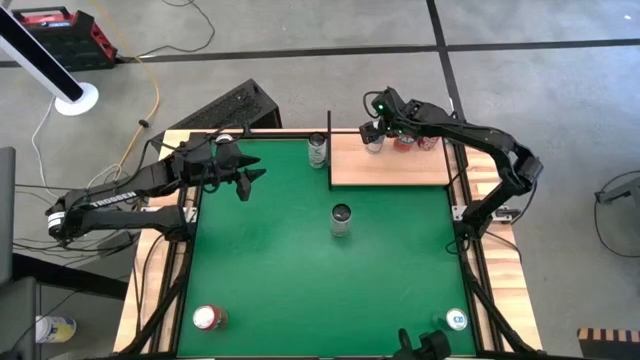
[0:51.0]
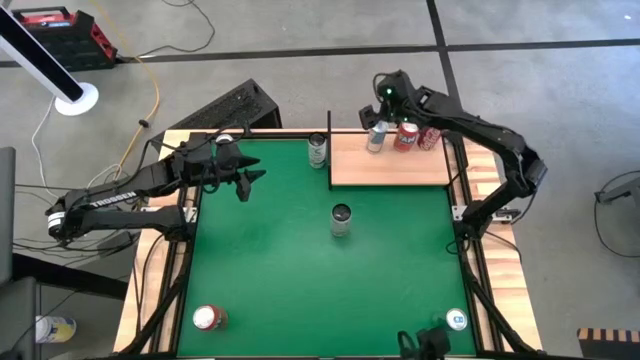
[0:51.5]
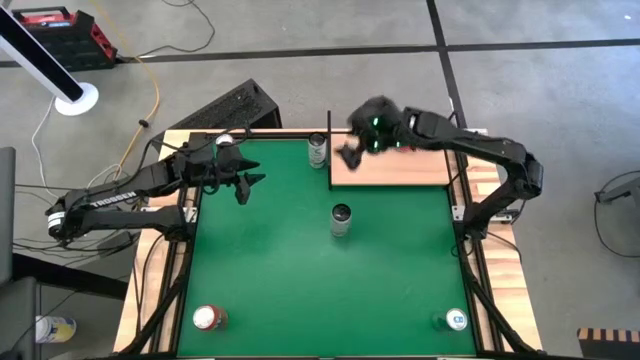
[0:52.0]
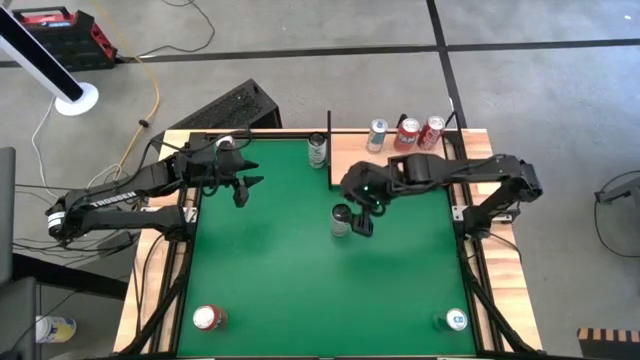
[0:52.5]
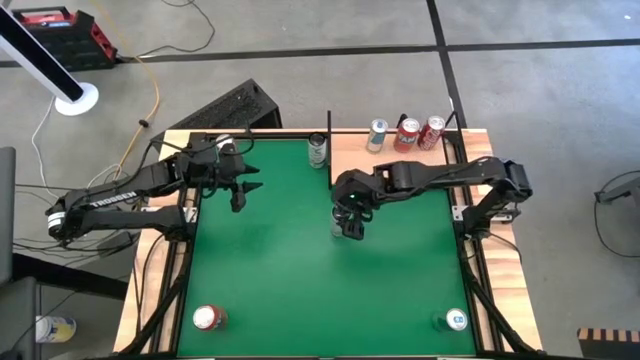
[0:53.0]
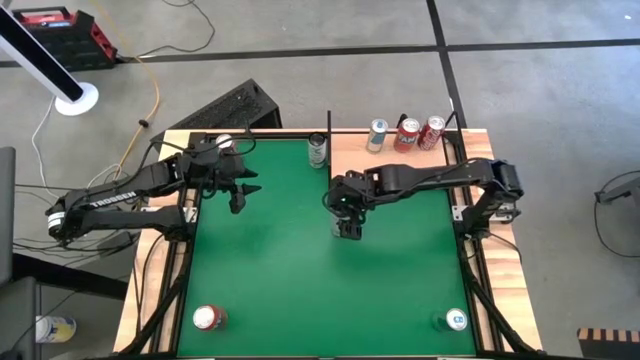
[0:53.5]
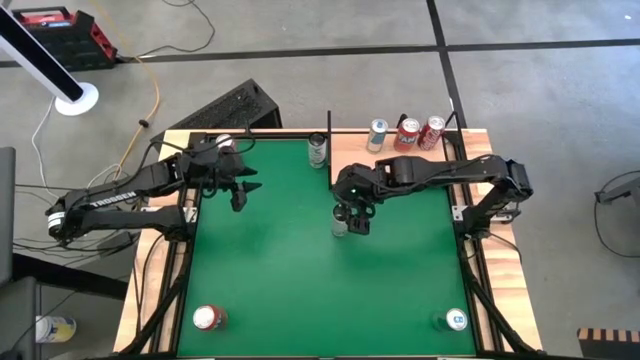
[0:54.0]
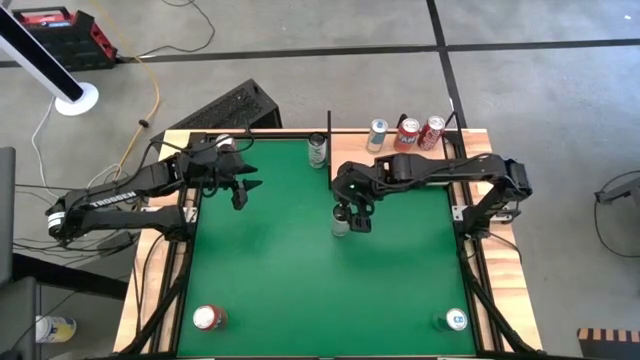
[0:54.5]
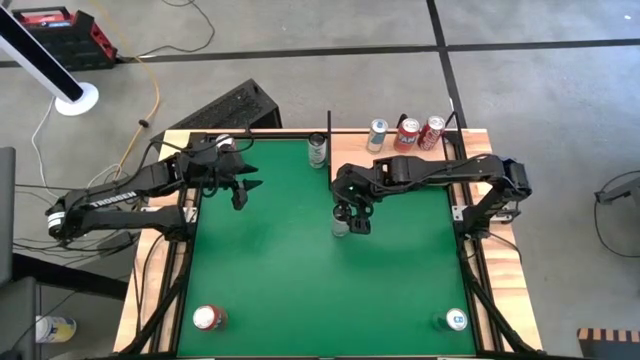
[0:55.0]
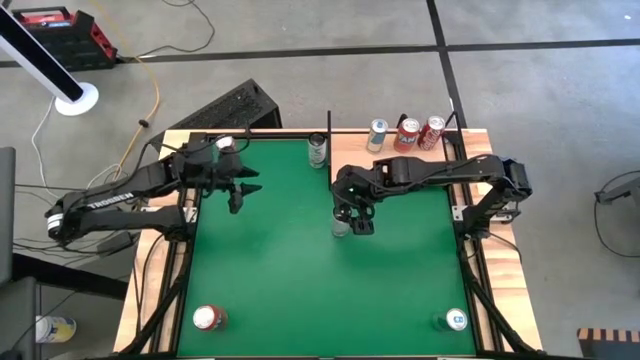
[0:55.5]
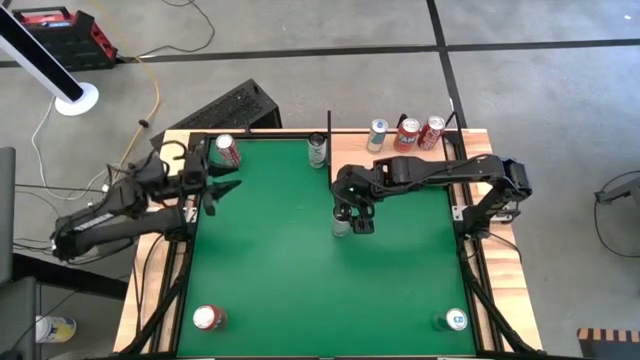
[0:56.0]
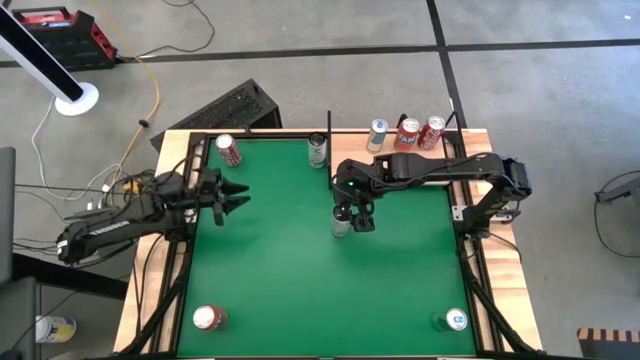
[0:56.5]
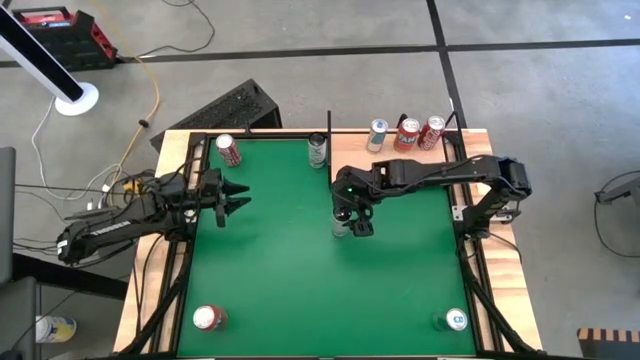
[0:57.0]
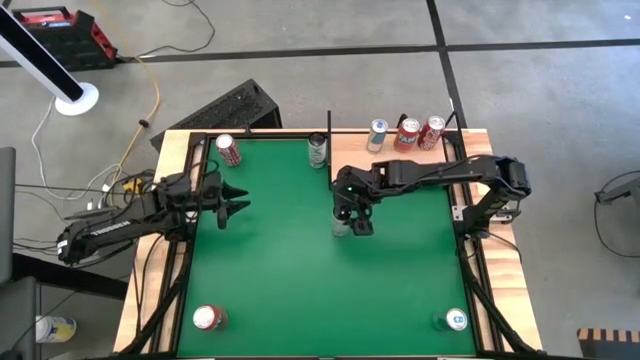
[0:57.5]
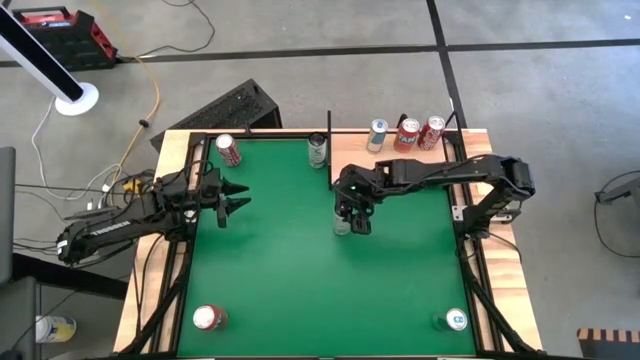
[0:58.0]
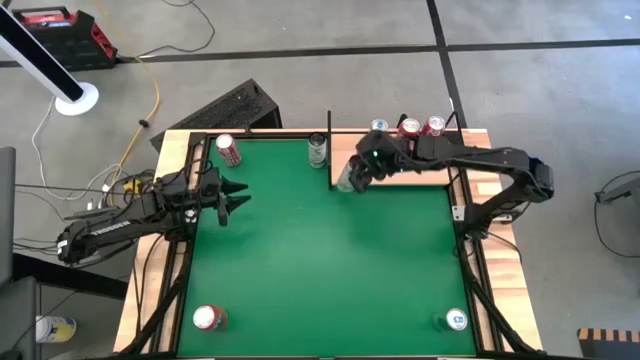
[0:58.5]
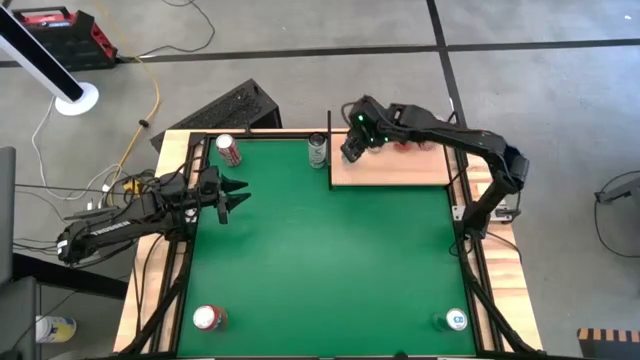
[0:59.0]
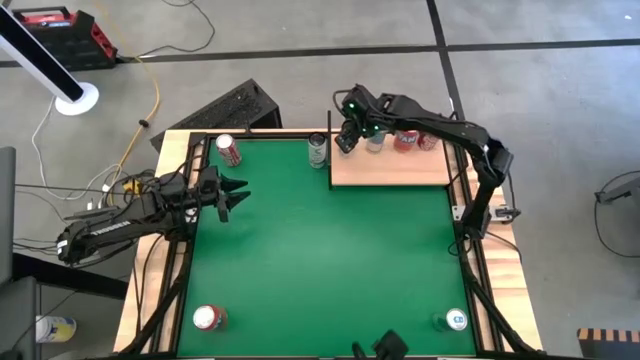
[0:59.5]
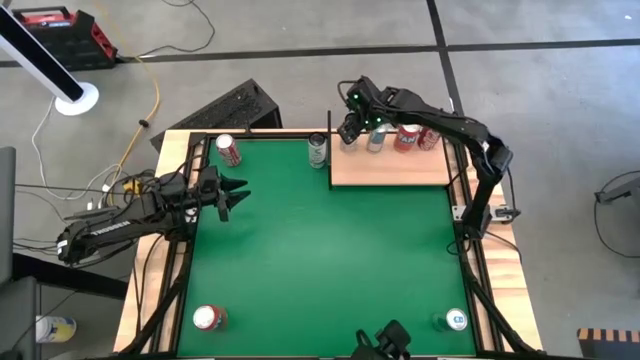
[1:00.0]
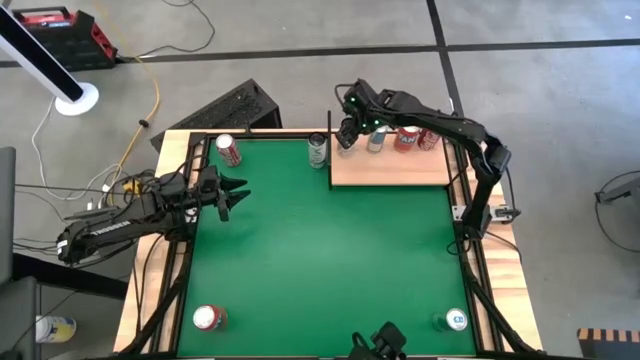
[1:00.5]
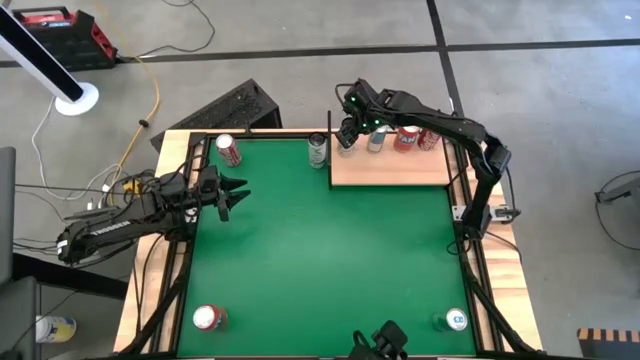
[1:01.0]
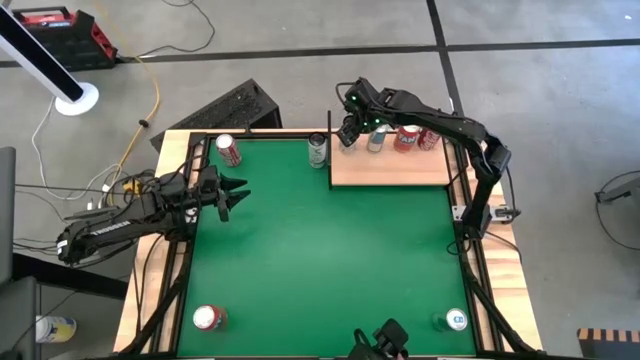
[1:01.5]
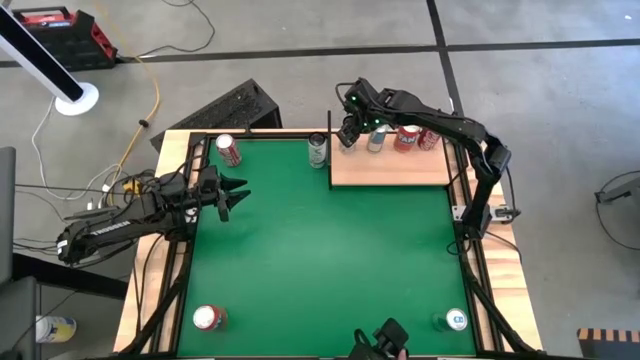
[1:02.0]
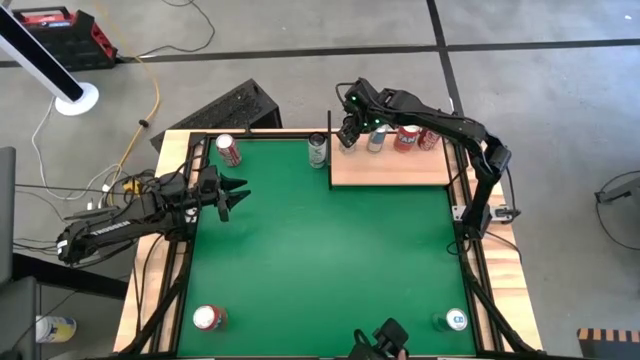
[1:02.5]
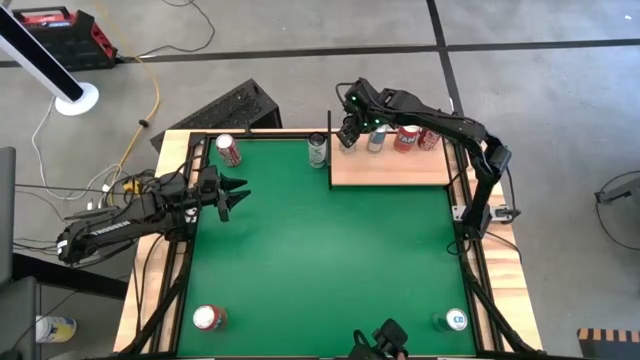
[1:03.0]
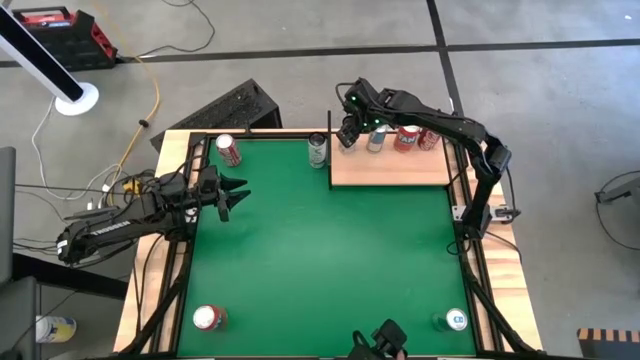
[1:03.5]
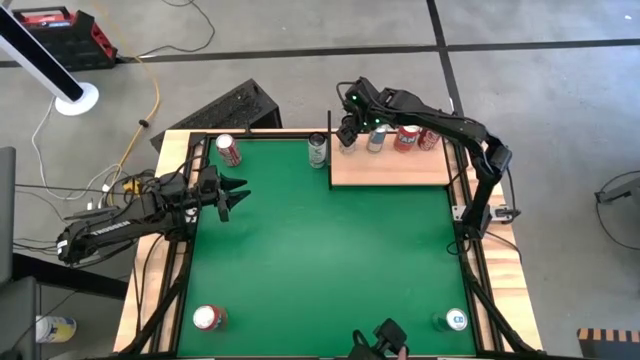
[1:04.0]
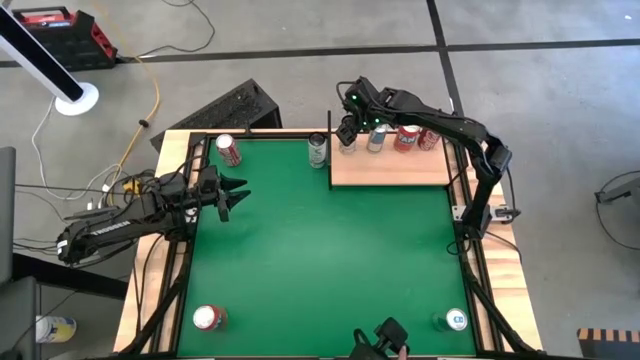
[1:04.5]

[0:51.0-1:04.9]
Task: Place canned beverage on shelf
Put the bottom white yellow soda can on the shelf
